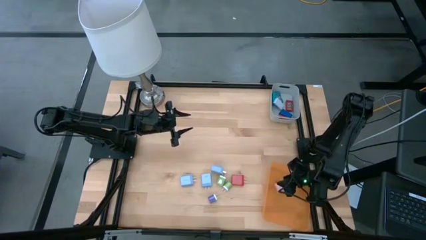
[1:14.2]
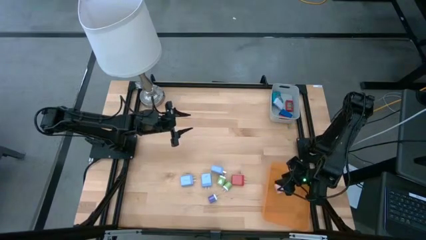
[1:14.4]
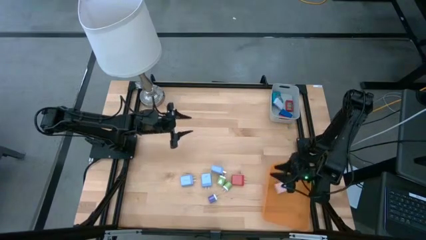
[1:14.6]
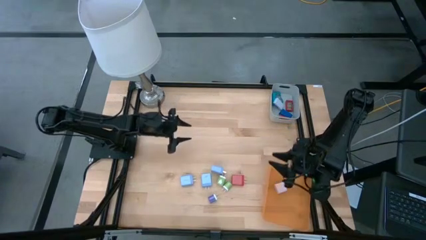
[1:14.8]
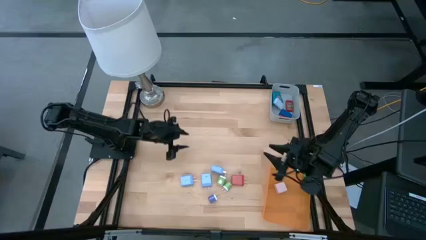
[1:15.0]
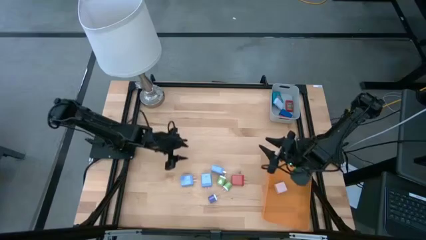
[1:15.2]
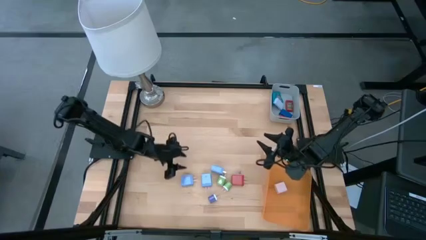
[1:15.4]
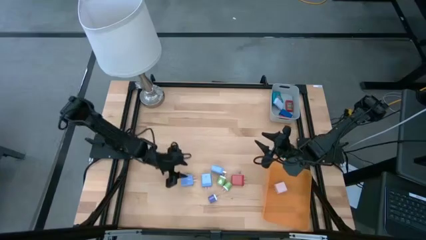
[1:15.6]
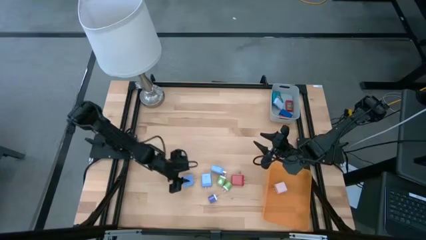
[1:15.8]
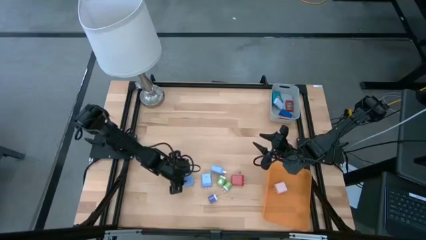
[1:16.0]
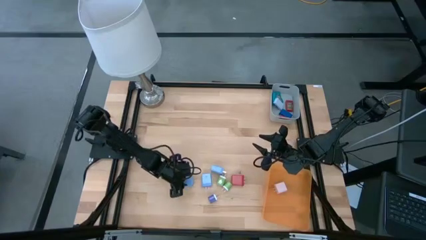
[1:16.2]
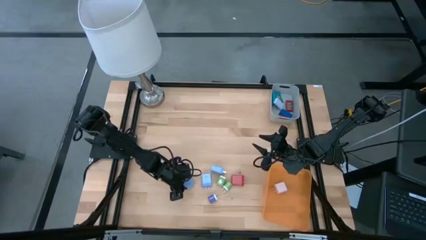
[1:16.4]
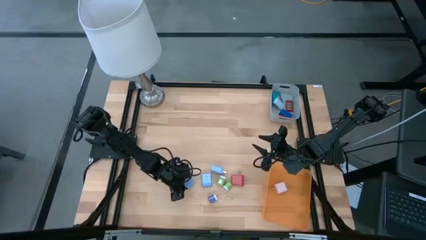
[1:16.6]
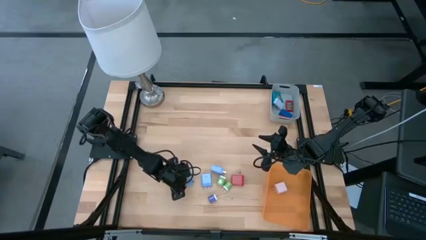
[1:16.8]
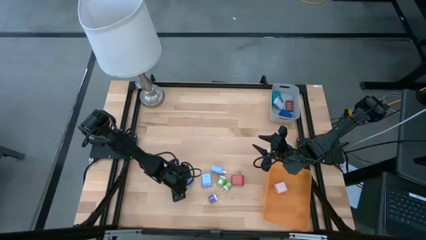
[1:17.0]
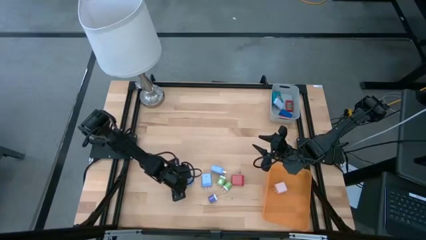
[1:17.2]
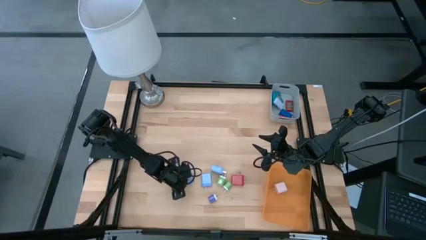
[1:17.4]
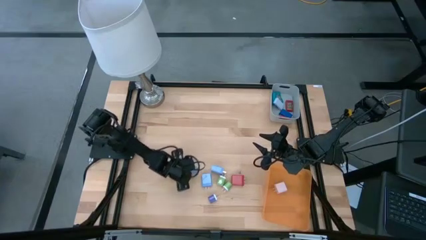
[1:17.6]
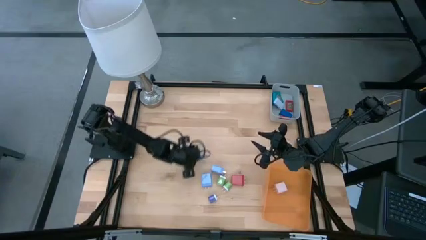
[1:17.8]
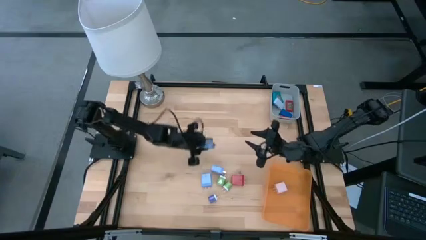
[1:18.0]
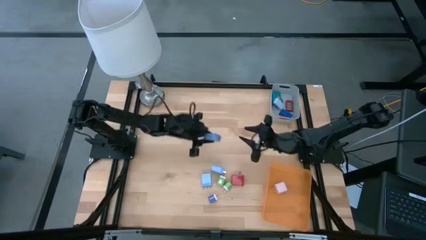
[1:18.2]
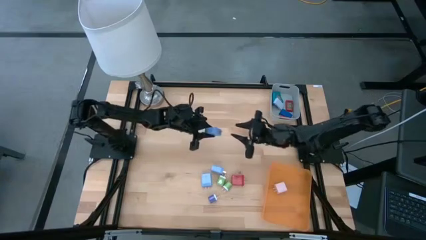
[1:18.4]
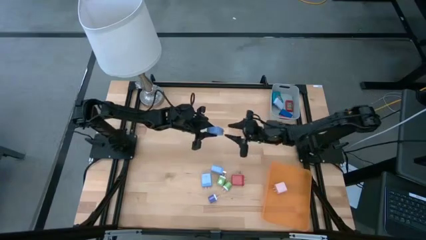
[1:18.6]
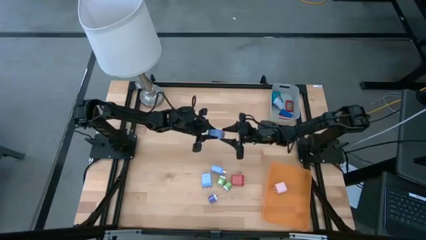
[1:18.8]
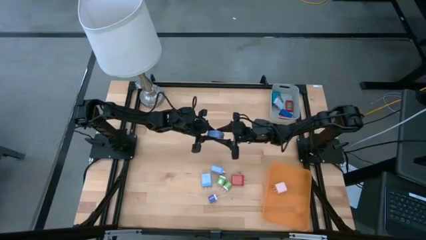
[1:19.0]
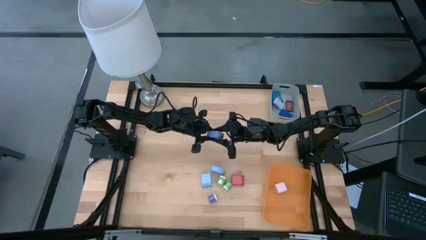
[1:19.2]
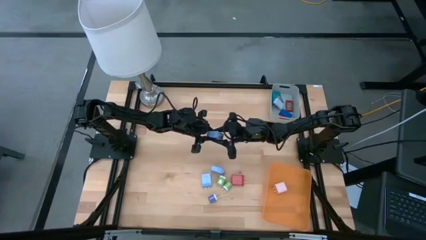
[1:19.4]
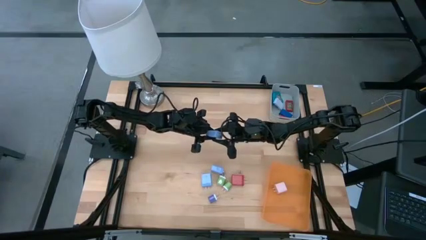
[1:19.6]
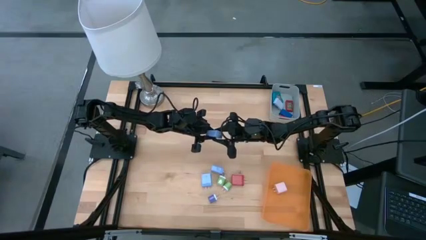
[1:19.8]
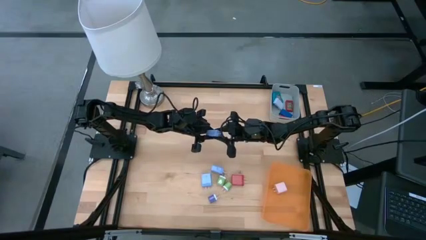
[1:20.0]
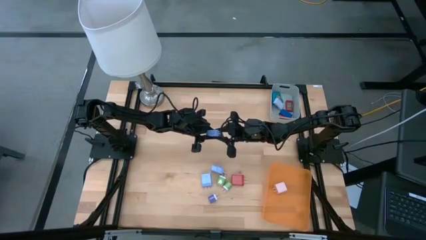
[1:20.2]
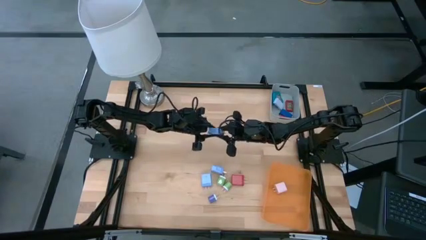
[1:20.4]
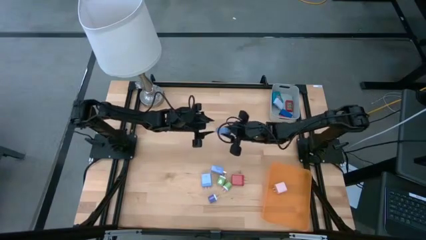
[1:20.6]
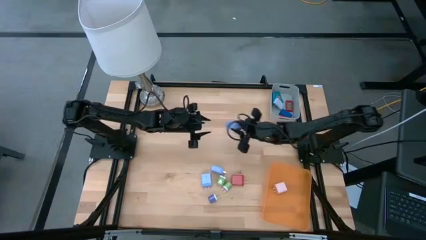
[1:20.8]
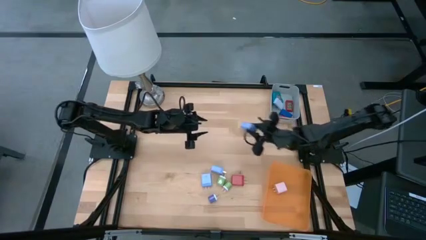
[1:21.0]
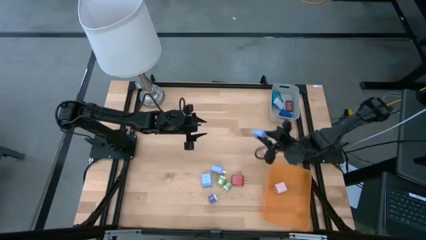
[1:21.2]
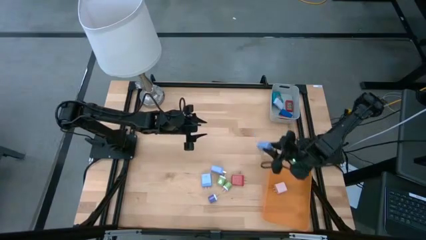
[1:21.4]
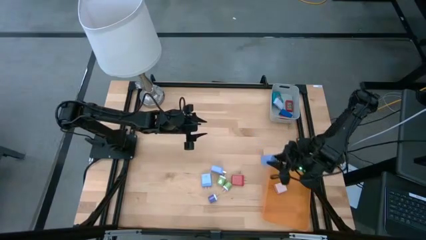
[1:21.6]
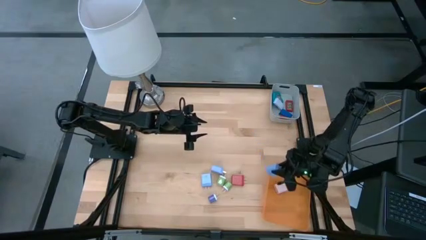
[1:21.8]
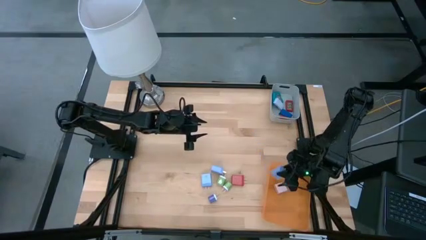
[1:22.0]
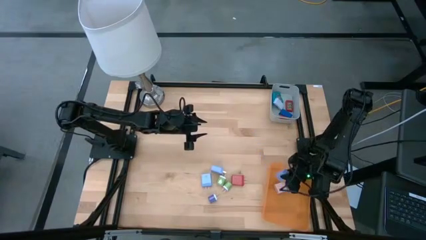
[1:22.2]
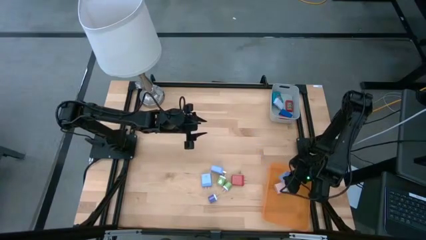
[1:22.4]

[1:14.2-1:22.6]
Task: Pick & Place Office items
Put the bottom left light blue charger adapter into the orange bin

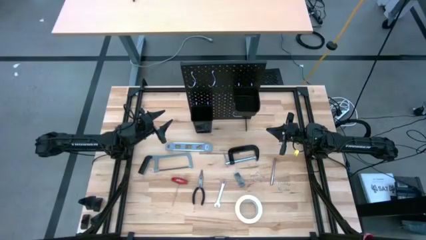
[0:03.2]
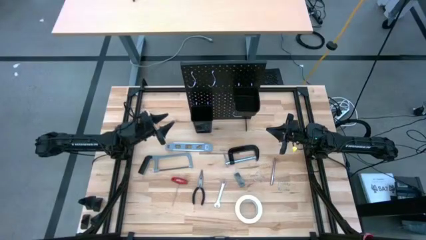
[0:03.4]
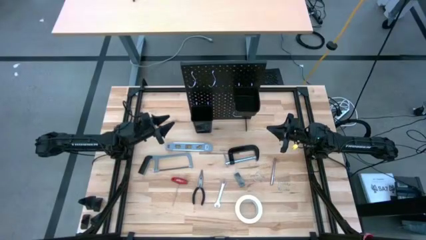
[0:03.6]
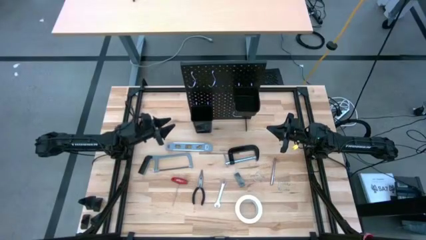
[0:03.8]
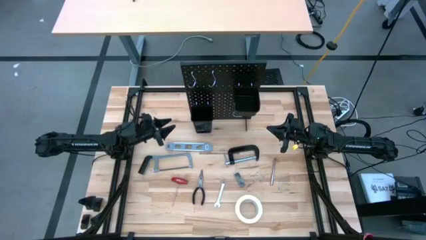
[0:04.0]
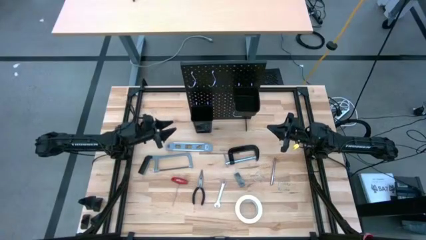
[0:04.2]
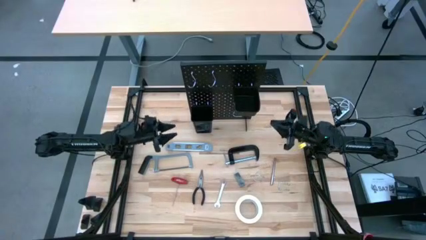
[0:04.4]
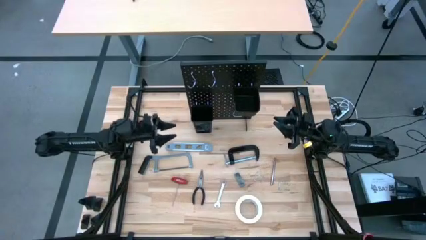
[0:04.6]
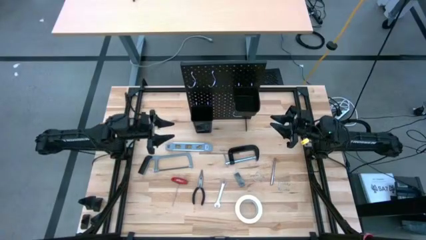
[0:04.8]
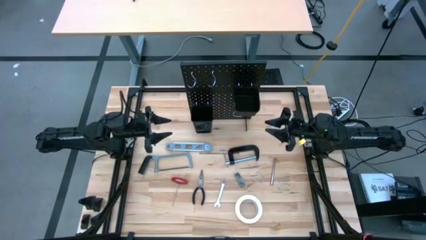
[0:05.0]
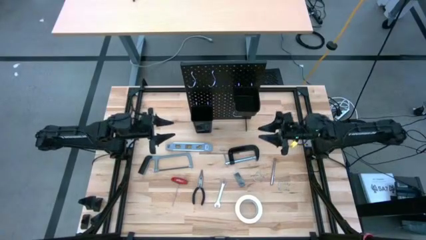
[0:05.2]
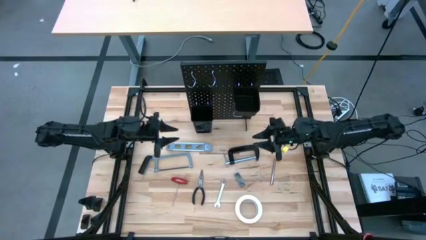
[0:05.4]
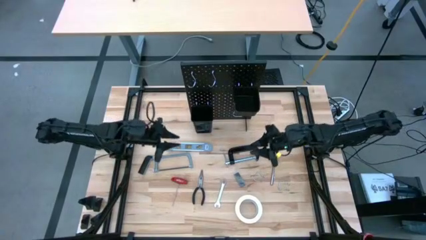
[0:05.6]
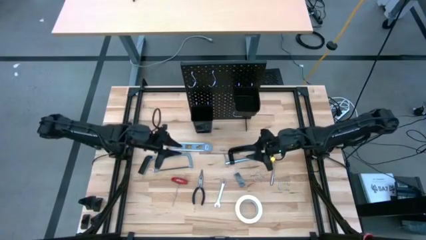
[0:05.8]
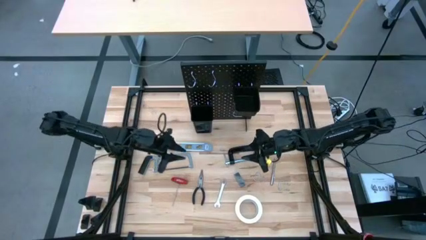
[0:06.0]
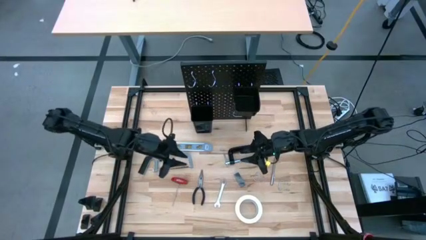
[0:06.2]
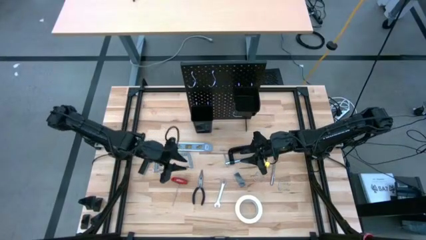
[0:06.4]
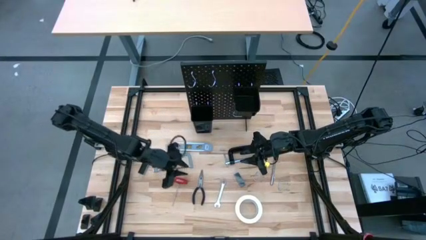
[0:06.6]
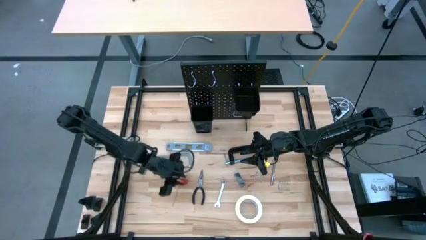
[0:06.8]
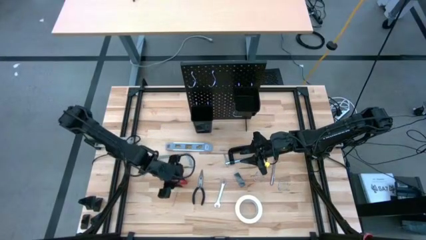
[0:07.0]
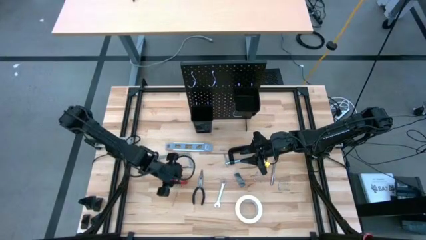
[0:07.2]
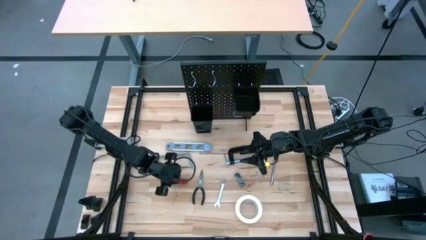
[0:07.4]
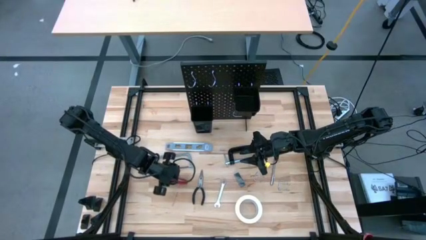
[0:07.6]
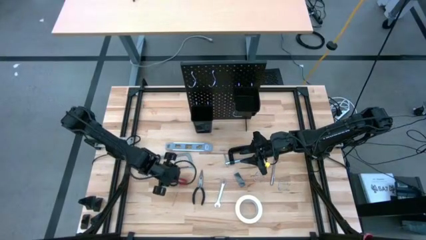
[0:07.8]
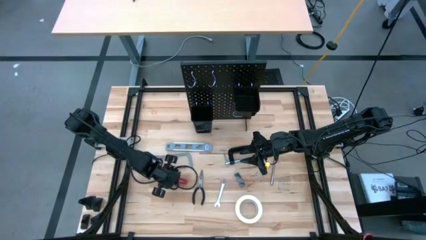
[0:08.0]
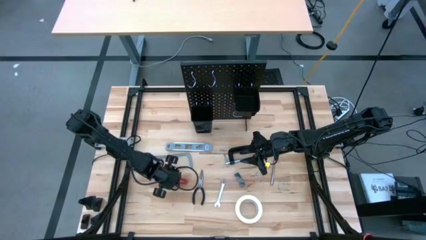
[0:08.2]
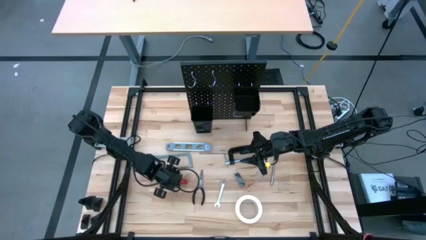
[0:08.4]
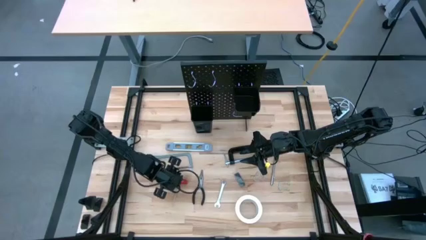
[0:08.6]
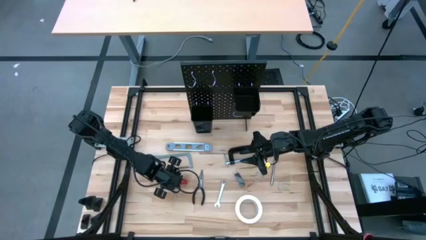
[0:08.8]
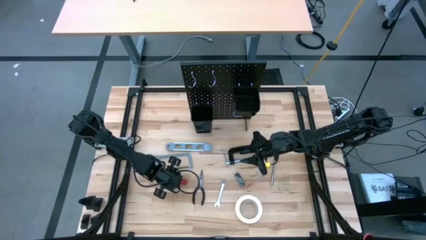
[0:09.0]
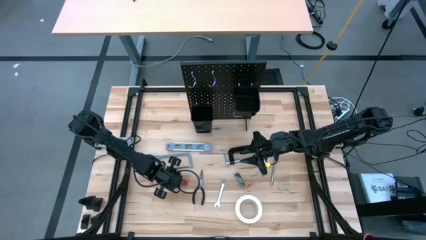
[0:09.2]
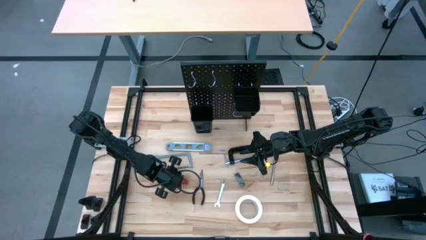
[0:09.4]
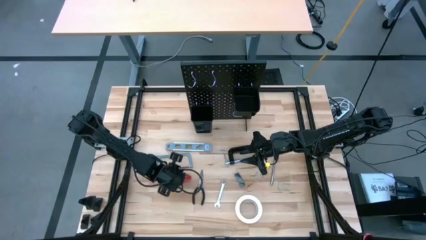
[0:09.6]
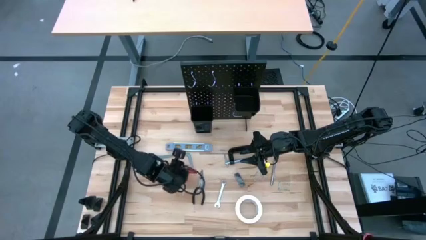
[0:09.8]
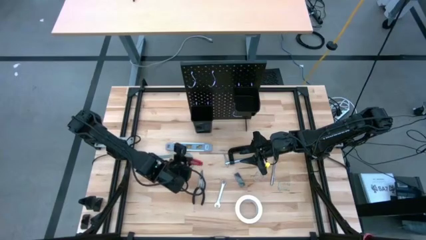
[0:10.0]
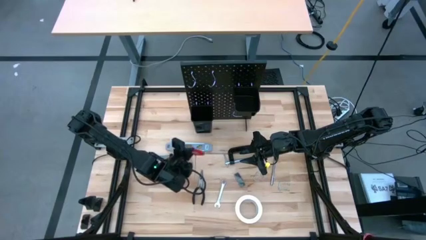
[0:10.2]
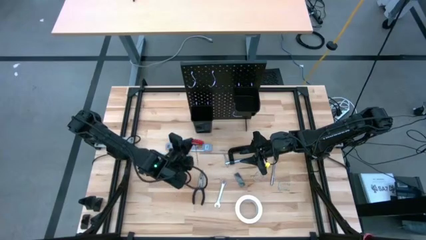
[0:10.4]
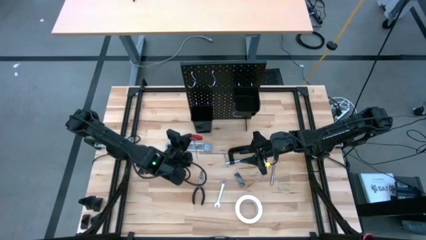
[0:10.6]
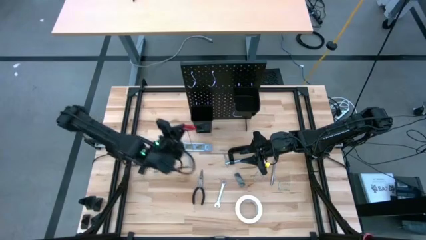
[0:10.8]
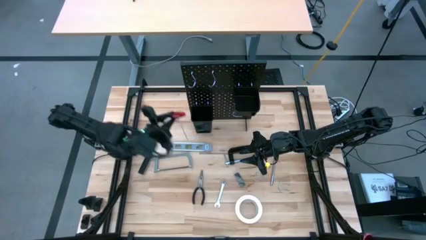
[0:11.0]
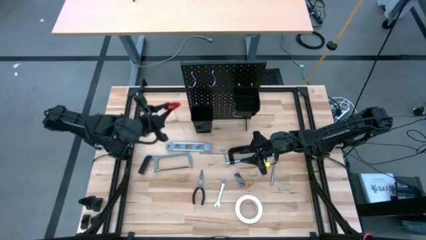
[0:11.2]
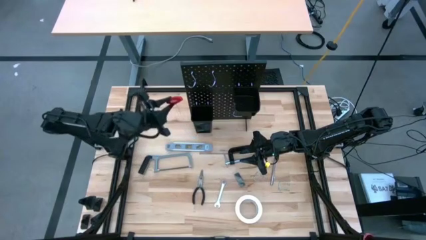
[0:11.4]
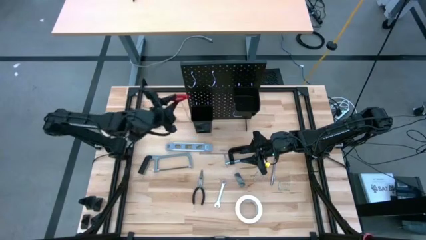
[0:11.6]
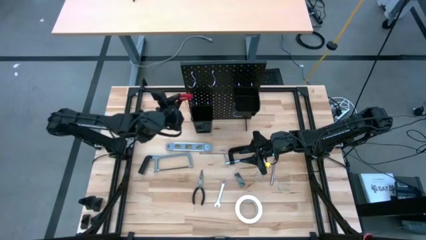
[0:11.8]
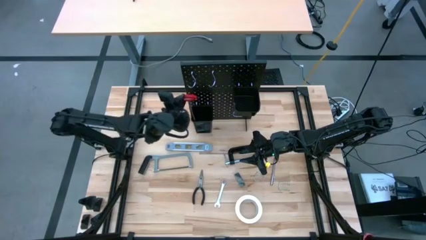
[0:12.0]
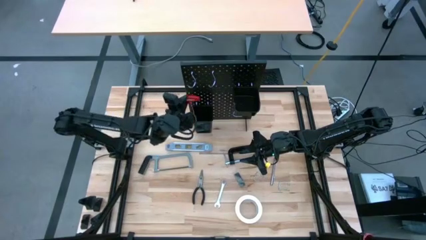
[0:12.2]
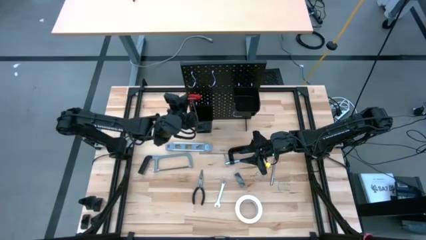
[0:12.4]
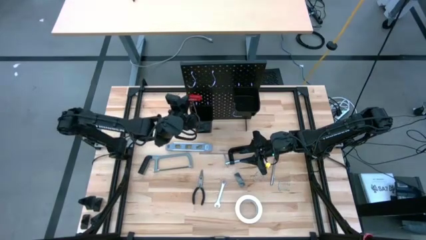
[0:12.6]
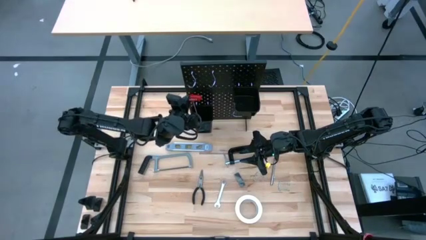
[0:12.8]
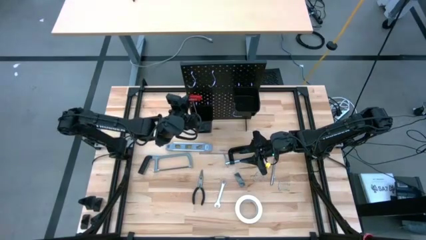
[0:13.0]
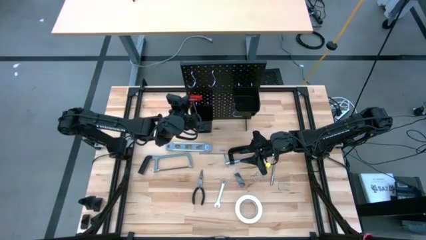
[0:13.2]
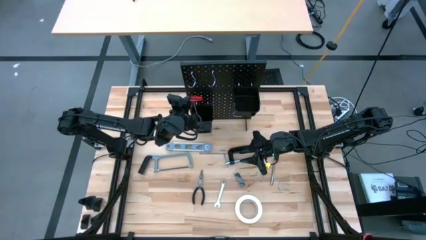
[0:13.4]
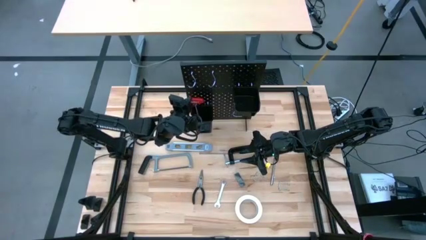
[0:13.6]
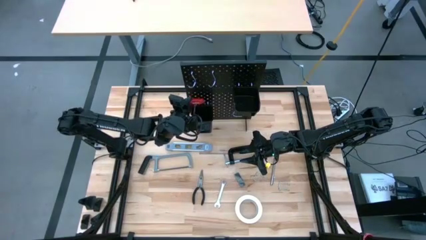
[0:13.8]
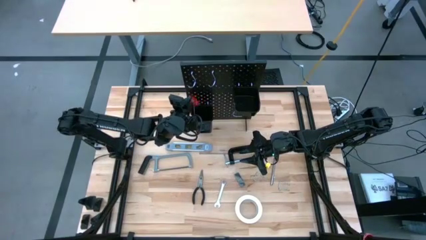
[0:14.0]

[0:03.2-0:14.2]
Task: Hang tools onto peg board
Put the Allen wrench into the bottom black bin on the pegboard
